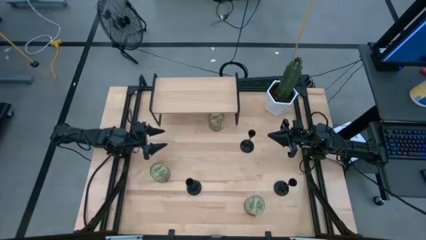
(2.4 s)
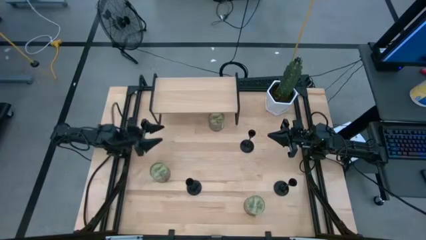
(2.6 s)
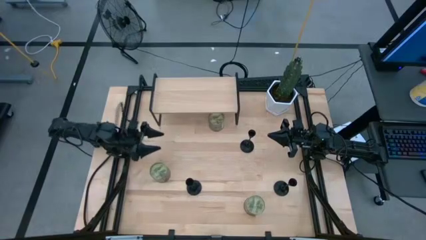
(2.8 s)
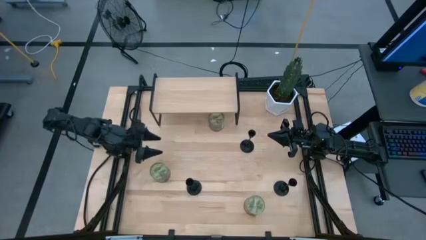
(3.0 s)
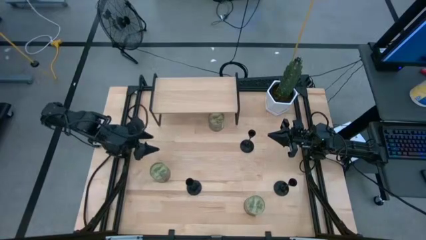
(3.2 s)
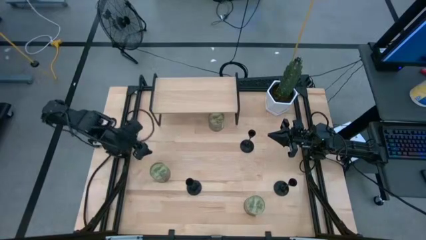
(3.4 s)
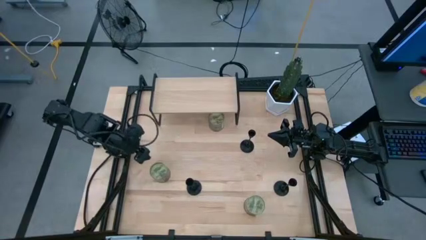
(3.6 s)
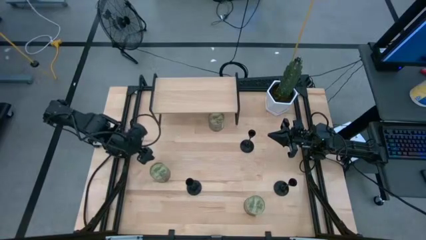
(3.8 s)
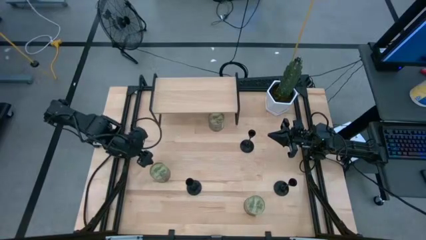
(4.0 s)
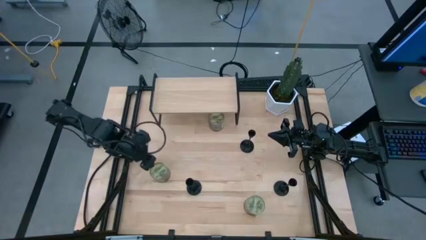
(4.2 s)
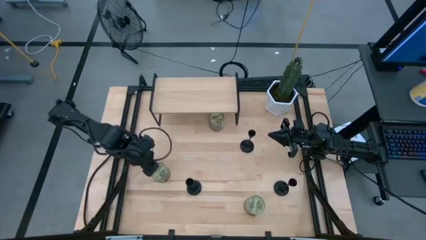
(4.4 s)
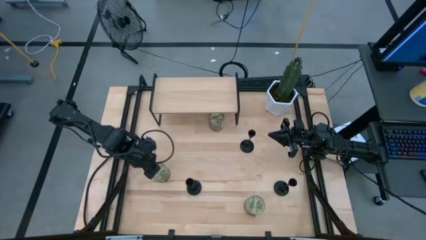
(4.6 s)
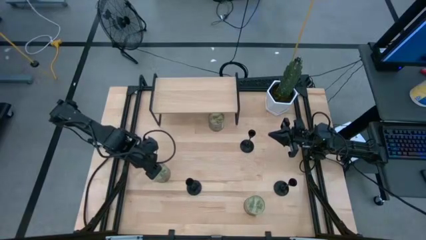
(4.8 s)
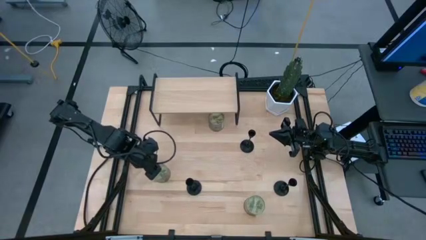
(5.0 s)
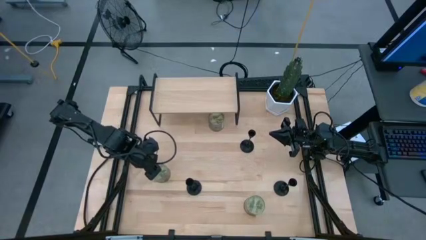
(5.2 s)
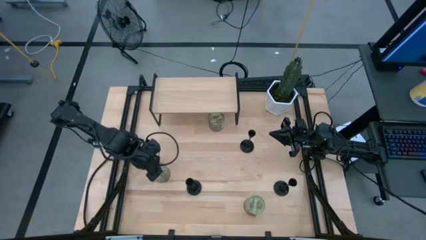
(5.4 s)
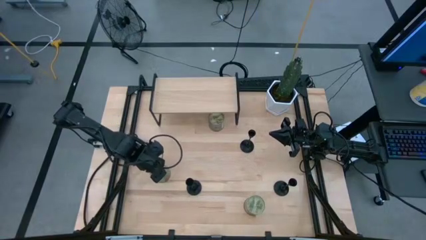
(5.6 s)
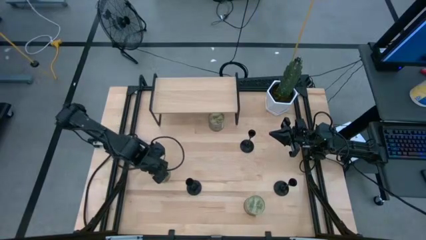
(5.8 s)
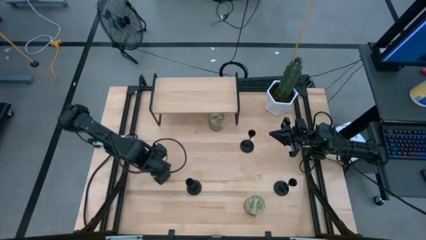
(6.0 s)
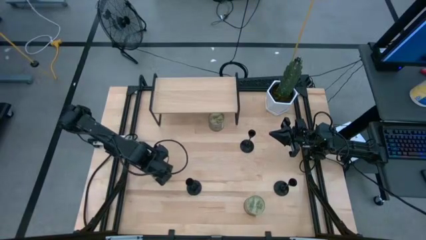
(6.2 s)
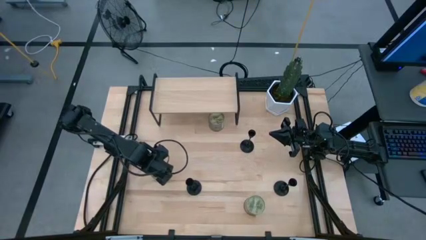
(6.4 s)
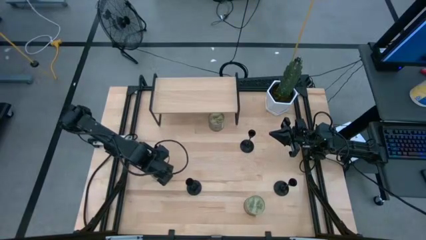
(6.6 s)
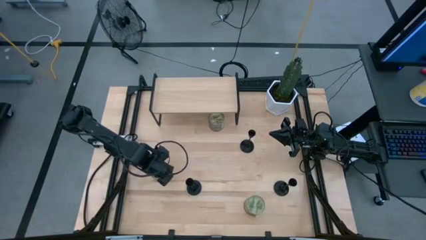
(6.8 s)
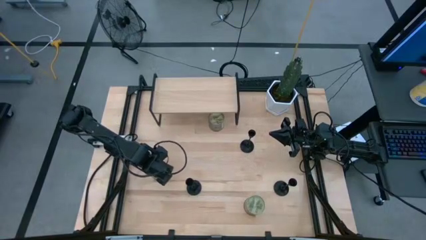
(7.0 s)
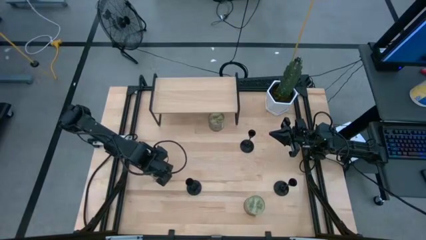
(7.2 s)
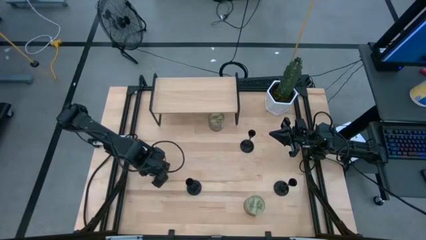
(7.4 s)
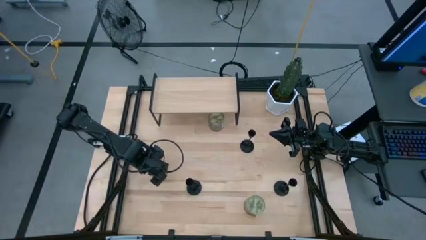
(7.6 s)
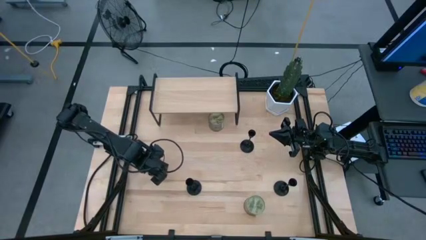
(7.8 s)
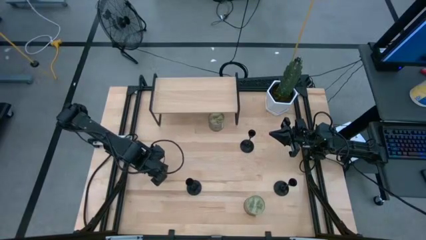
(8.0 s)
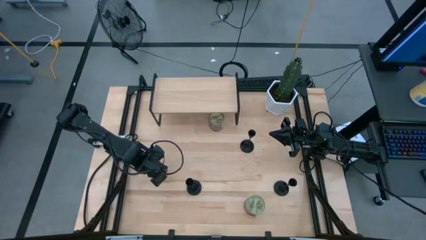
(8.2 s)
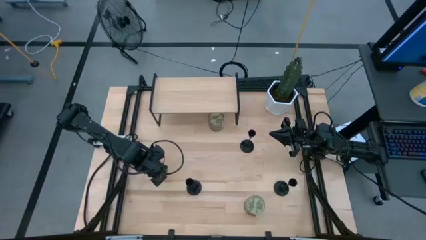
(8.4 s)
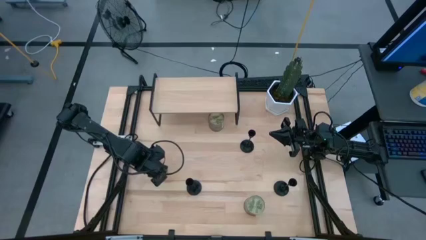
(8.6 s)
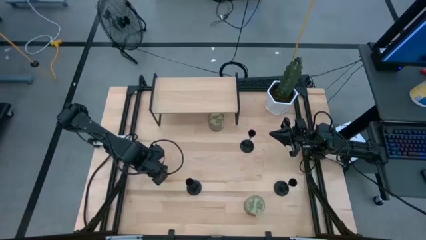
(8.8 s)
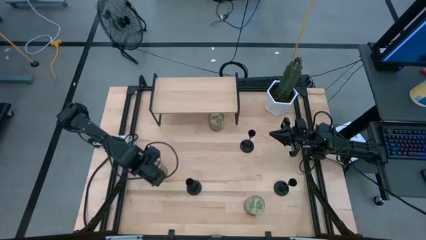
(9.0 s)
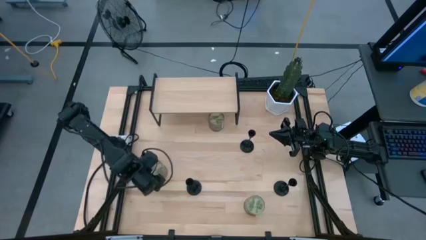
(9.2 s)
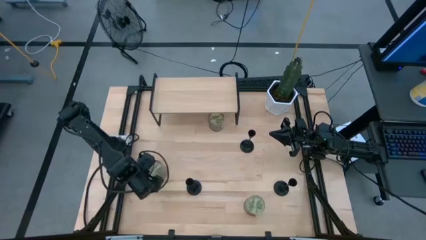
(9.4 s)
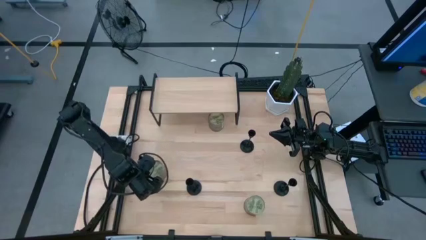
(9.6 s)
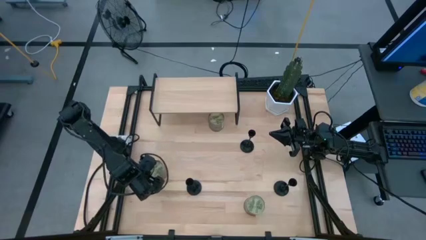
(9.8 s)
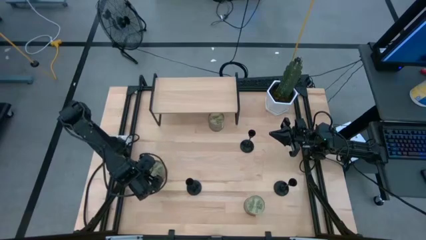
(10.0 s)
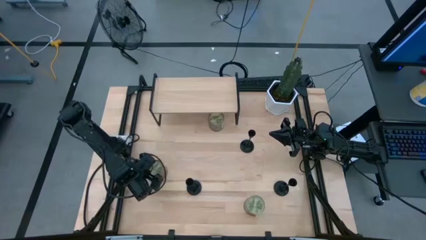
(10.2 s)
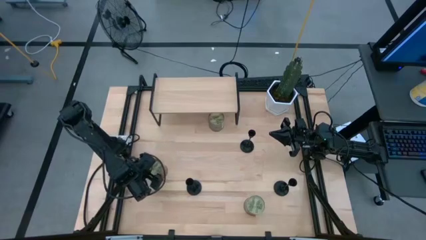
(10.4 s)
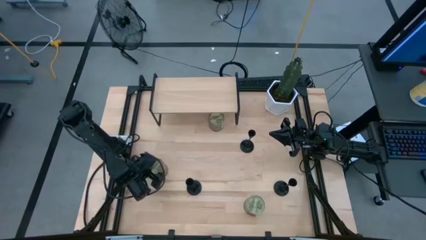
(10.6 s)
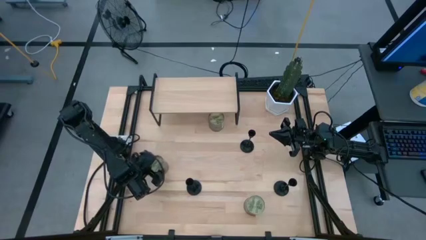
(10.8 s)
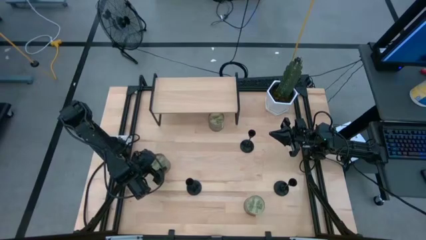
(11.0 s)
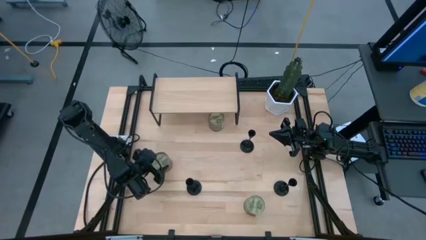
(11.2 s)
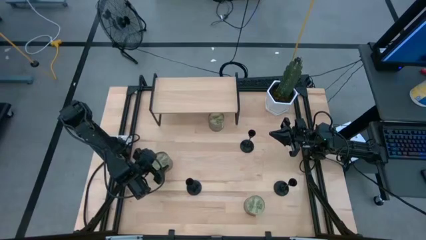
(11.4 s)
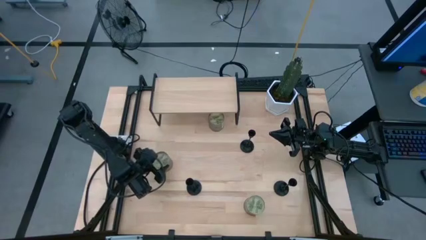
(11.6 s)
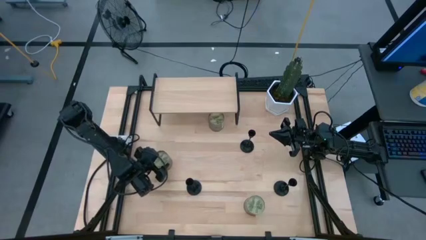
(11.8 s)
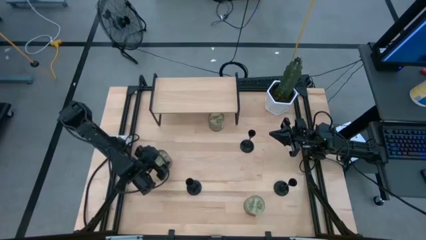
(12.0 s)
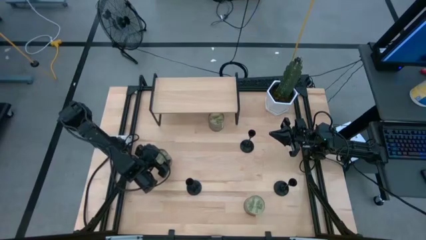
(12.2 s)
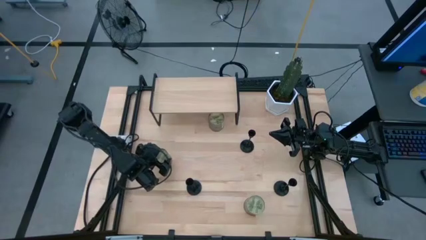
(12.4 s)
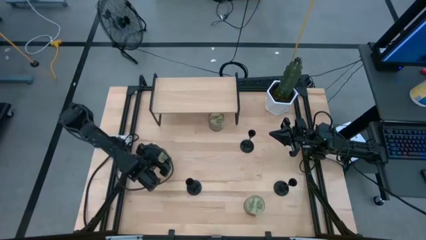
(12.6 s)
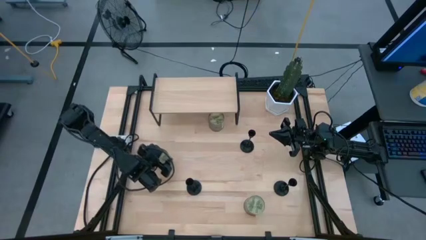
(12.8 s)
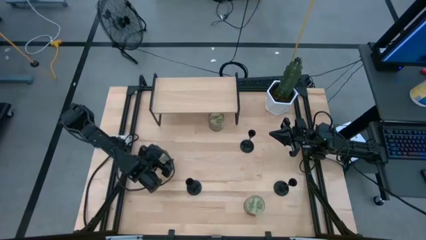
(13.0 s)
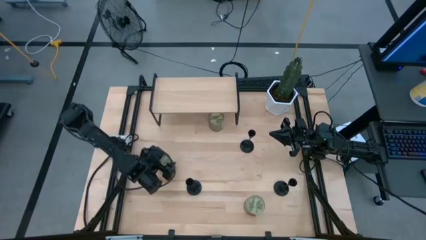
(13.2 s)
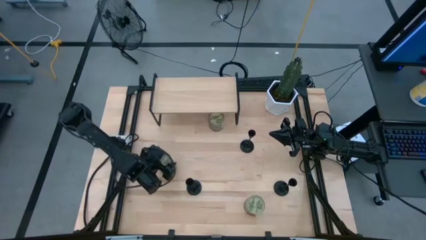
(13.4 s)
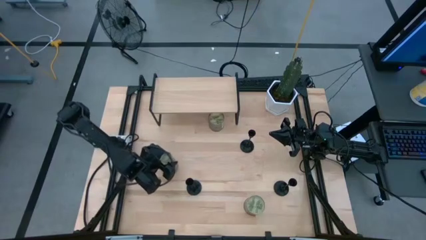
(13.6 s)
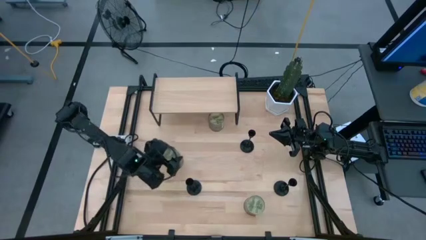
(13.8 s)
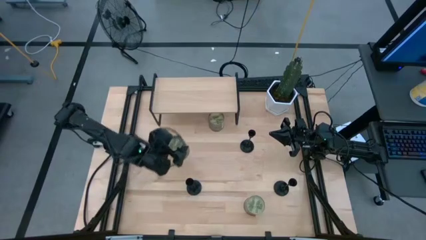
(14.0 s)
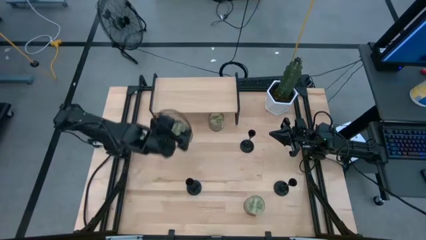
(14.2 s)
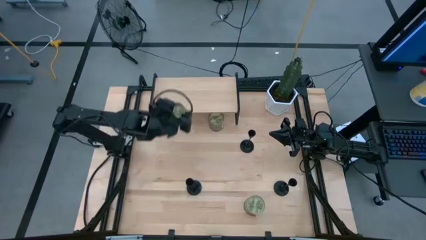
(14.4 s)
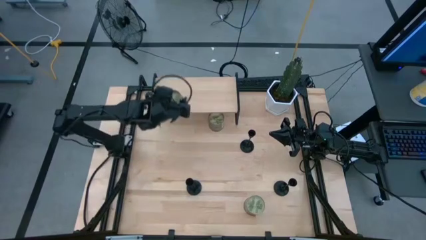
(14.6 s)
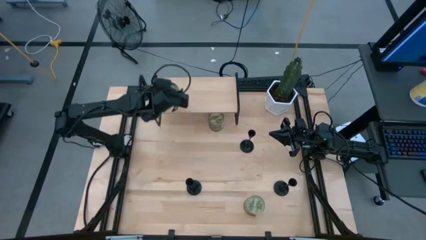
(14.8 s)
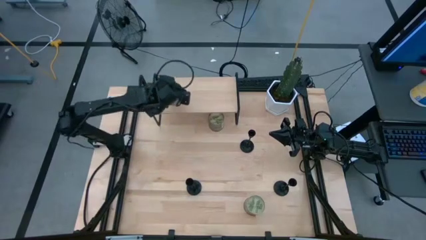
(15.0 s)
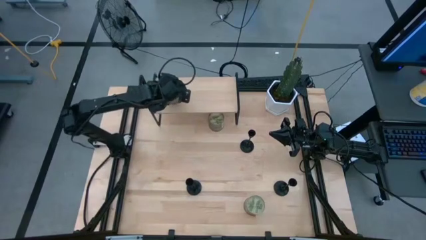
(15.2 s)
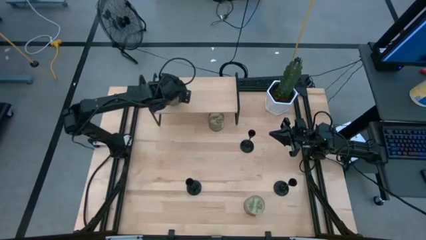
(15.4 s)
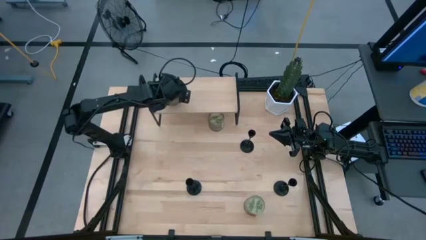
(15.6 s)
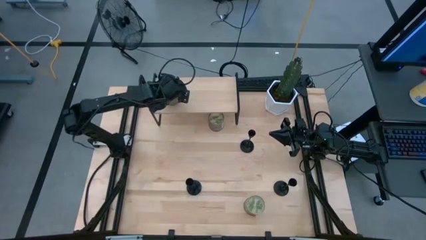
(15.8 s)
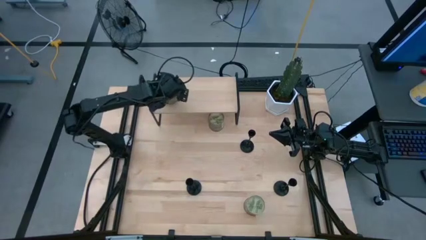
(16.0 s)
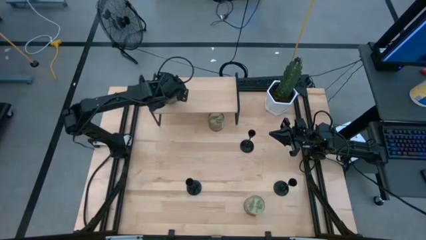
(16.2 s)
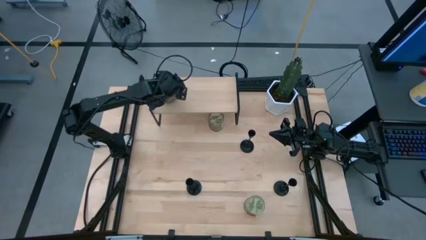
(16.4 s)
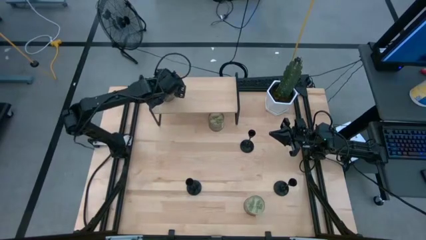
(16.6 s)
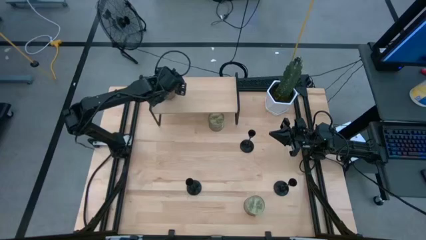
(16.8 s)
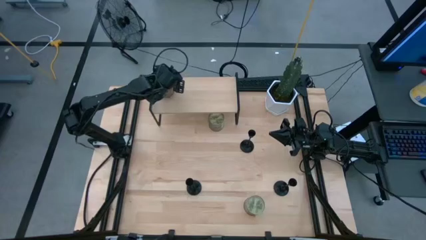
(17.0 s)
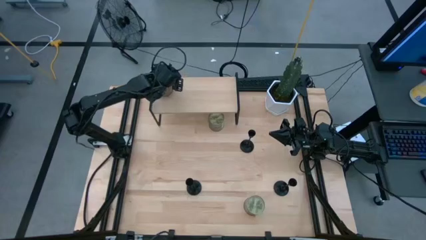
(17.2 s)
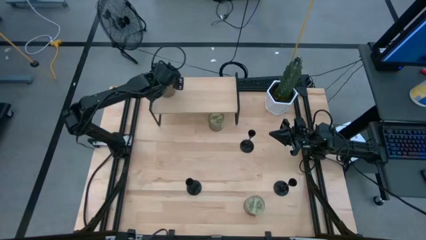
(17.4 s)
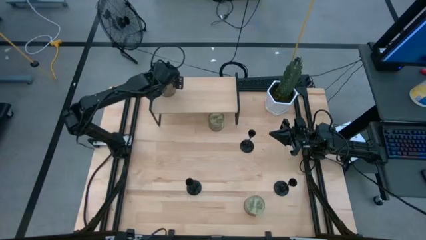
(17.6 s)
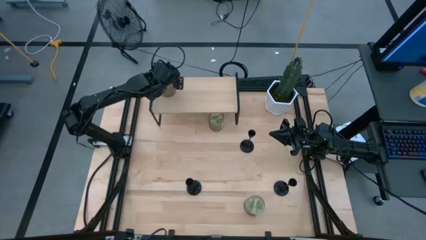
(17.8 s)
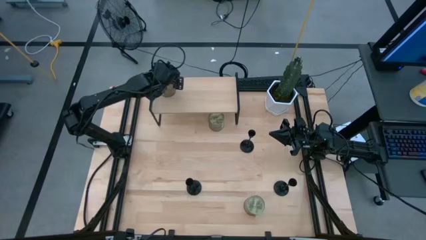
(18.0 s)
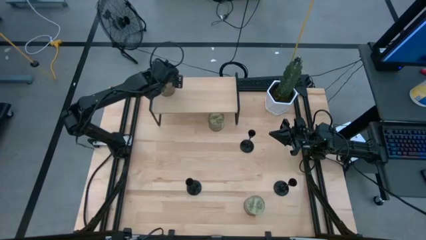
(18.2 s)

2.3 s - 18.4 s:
Task: Pick & Place candle stick holders
Put the left green scented candle on the shelf
